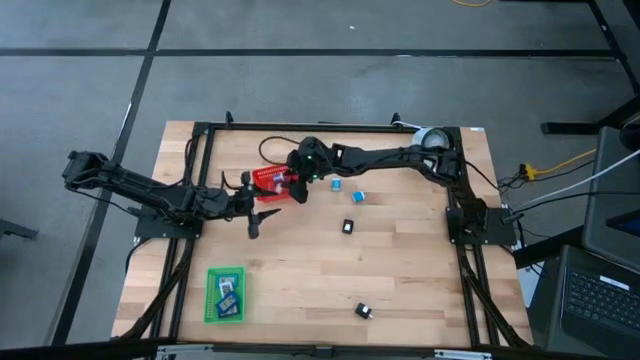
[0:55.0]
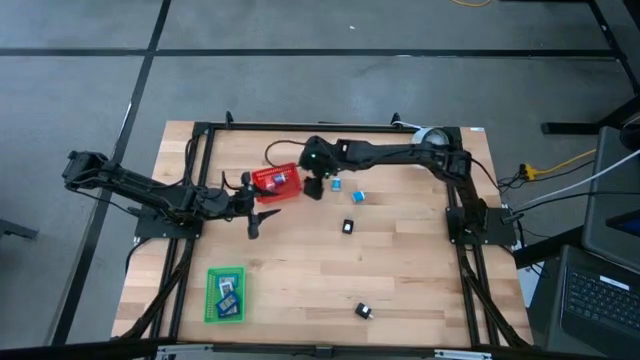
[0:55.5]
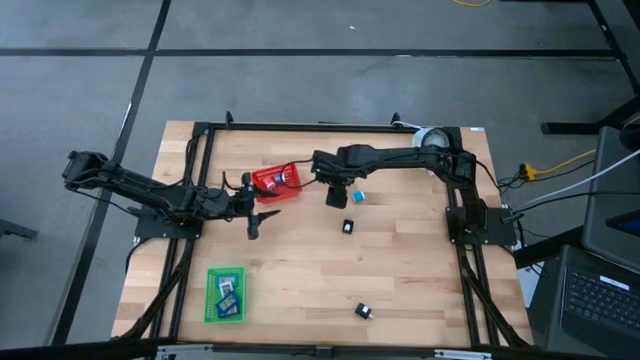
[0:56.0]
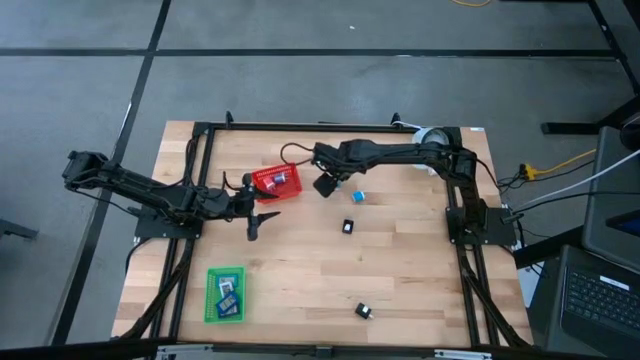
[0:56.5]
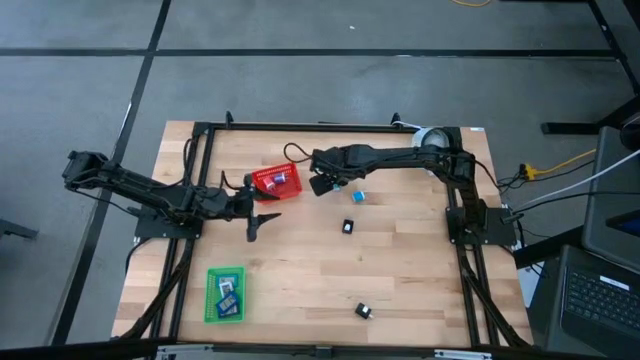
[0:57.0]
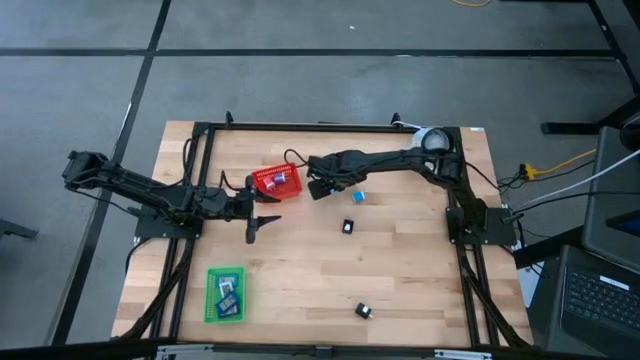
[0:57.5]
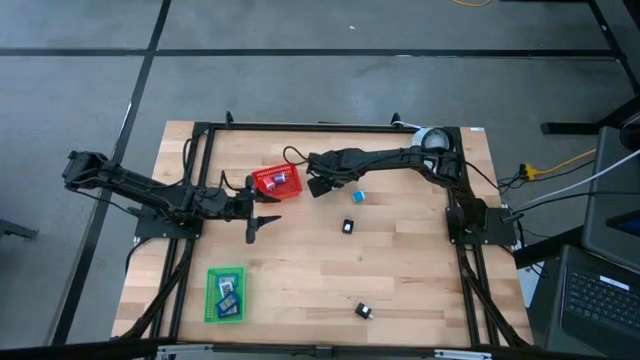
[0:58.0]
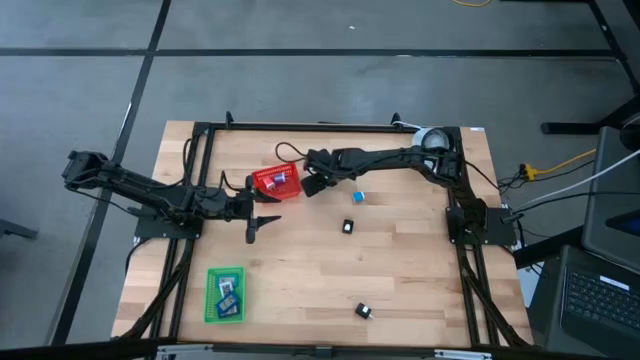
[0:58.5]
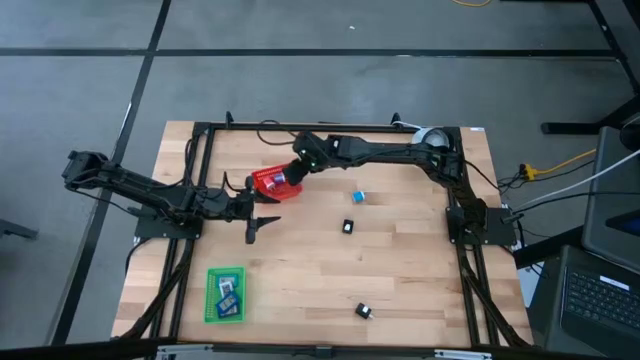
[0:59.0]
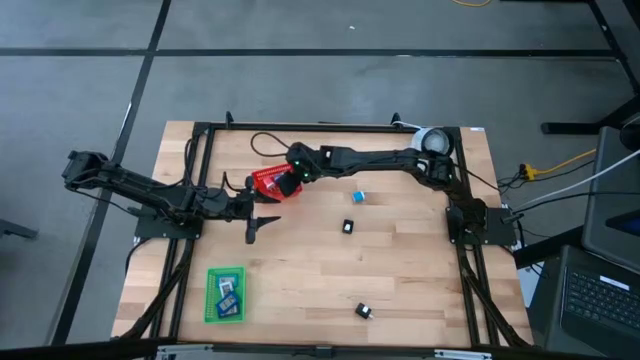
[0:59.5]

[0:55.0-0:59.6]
Task: Pick & Place Office items
Put the top light blue charger adapter into the red bin

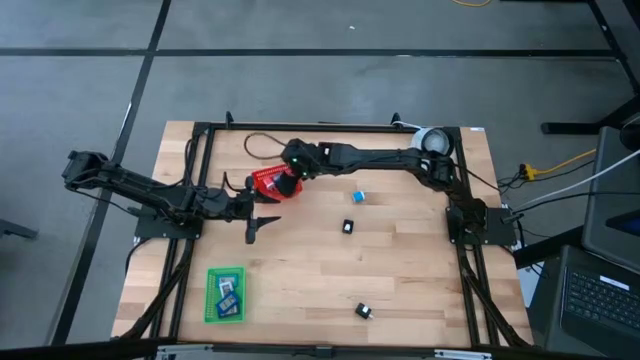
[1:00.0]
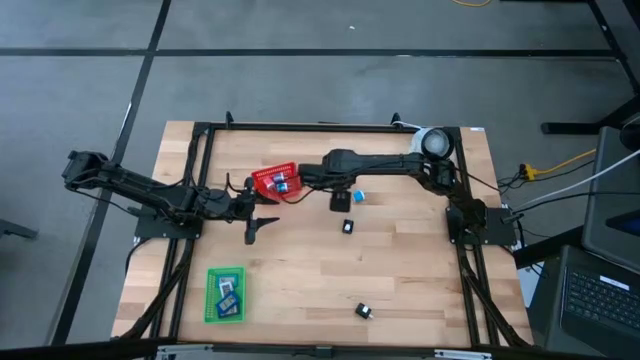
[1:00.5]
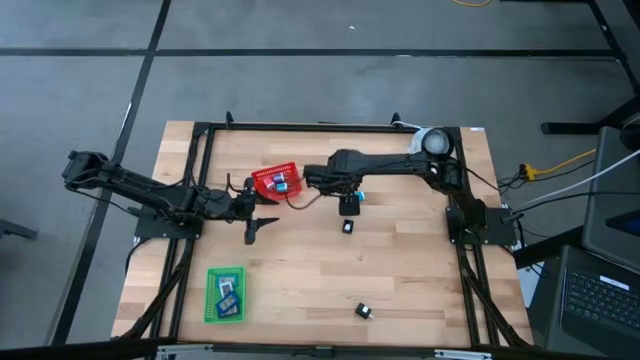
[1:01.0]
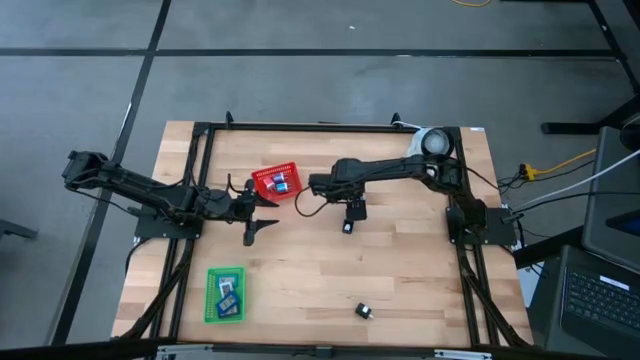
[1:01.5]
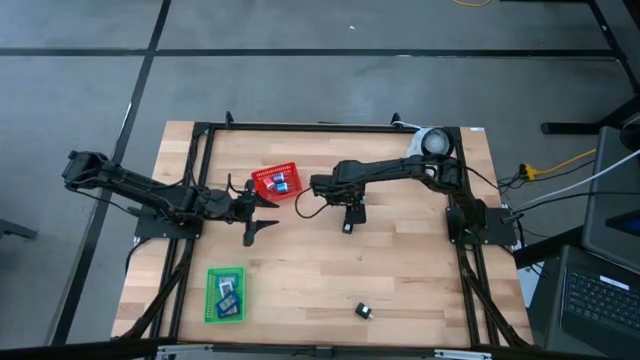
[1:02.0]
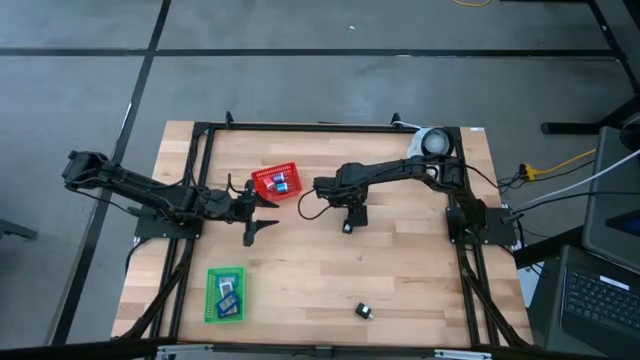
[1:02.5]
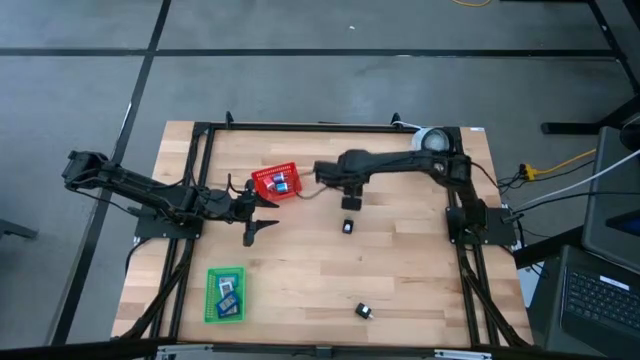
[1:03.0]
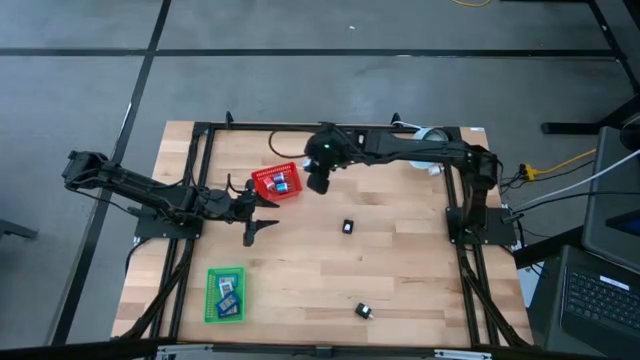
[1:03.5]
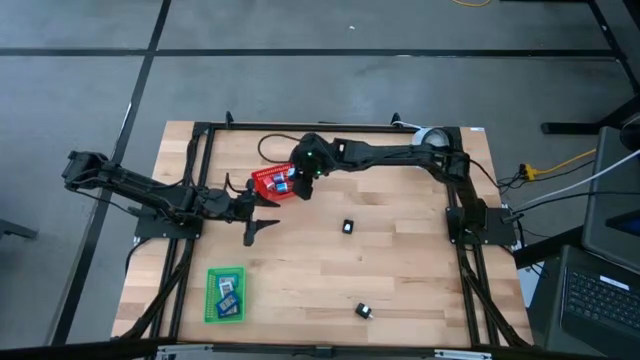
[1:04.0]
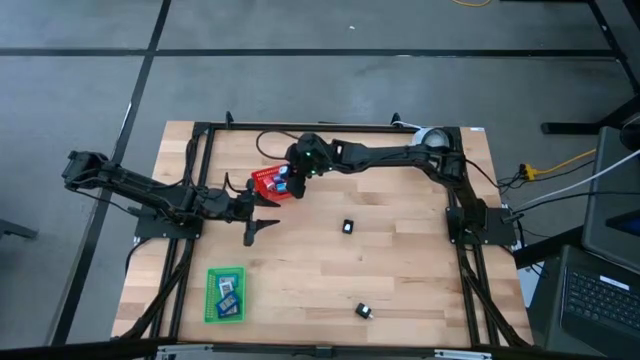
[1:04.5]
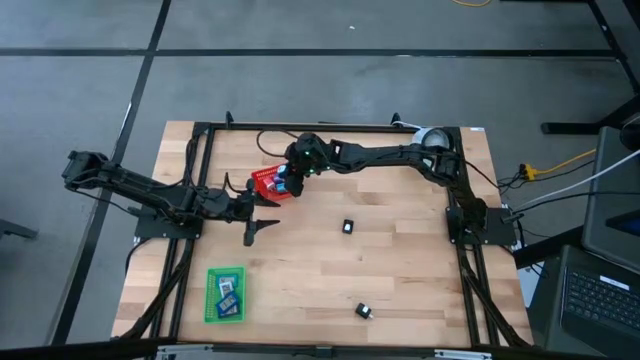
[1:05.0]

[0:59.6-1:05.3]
Put the light blue charger adapter into the red bin

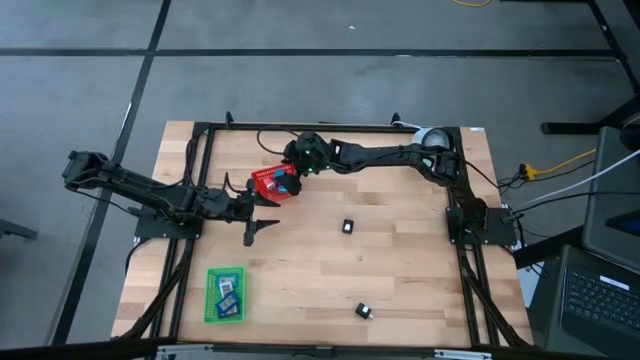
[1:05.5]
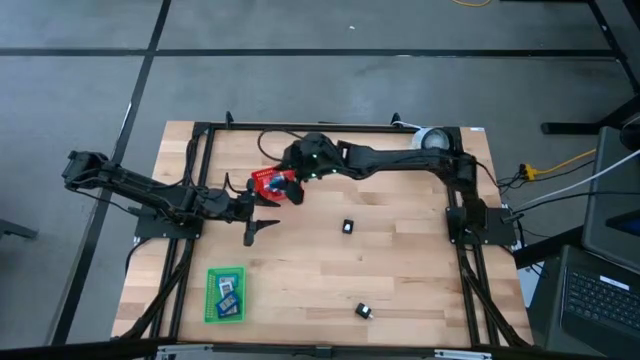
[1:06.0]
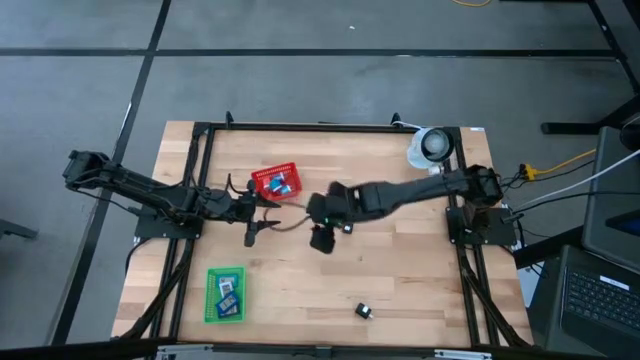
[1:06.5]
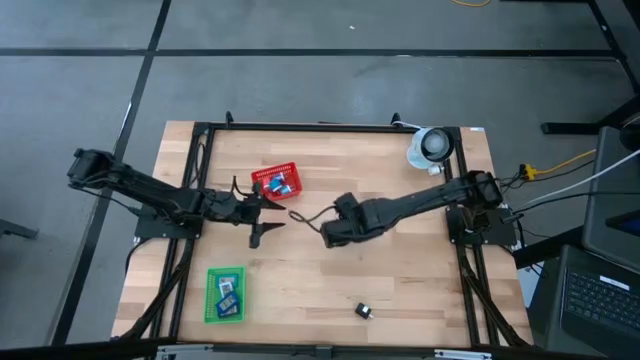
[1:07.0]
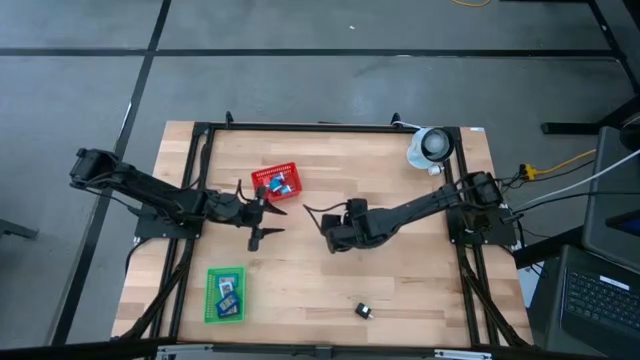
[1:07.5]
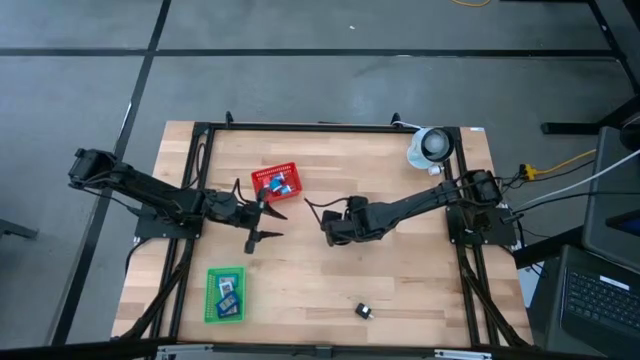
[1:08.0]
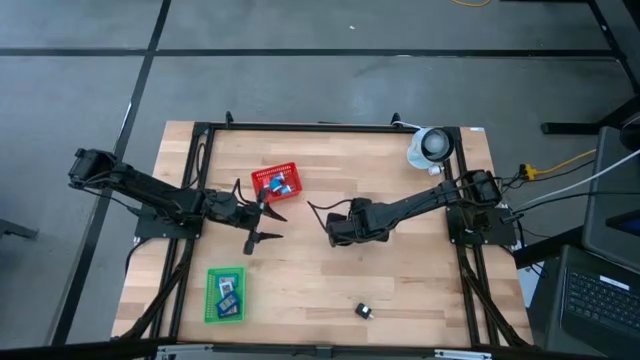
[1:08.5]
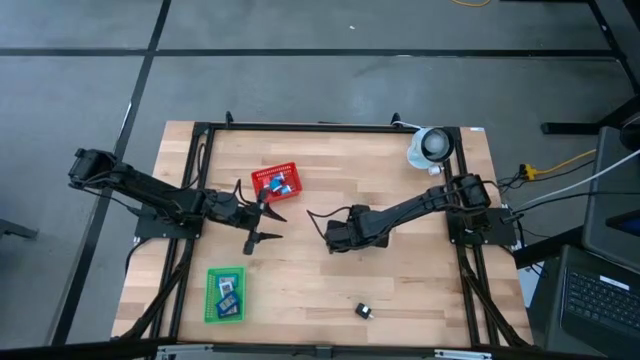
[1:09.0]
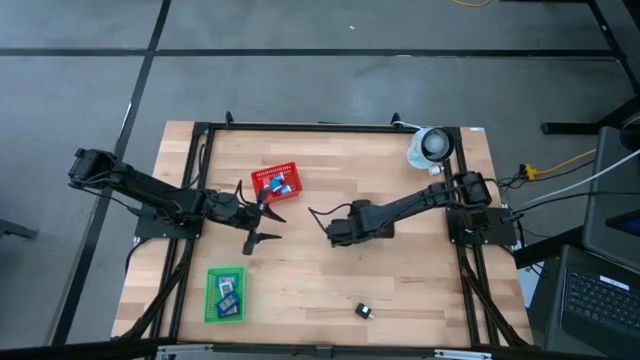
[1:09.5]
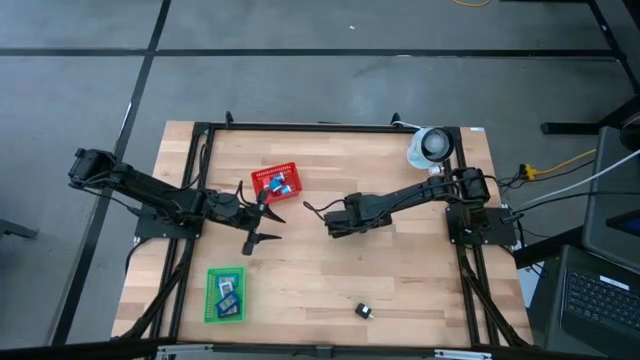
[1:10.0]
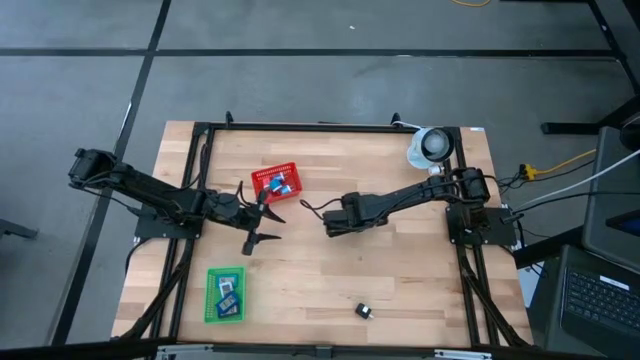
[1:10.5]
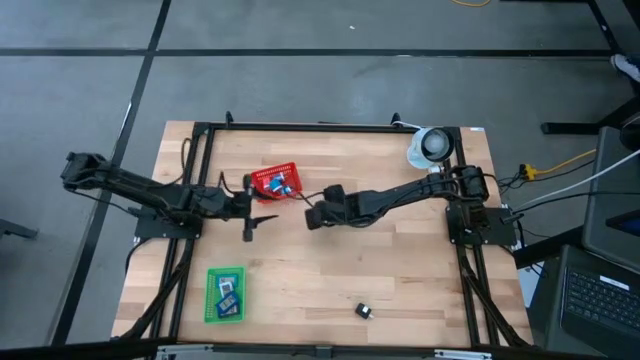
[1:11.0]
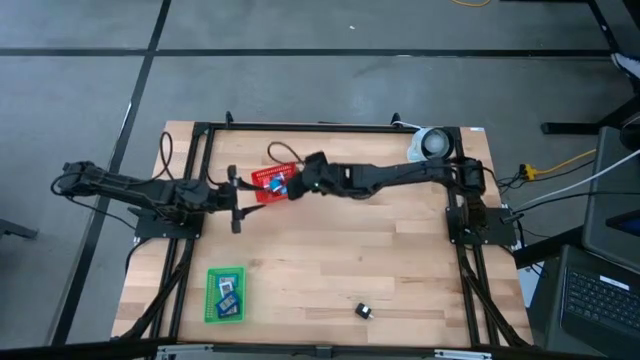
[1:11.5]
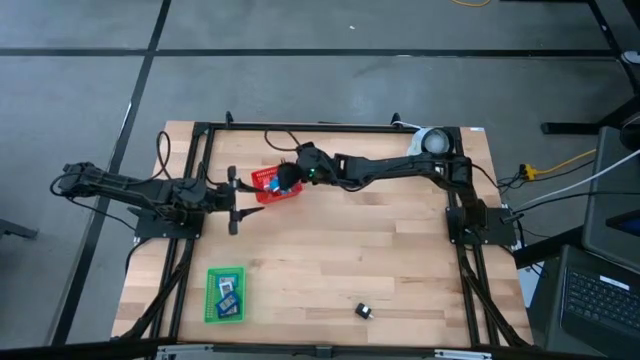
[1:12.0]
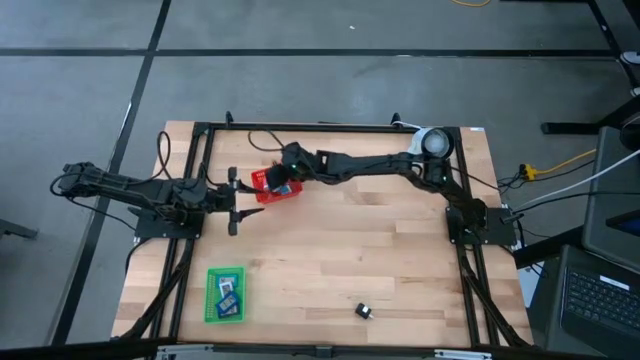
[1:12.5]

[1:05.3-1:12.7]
Put the top black charger adapter into the red bin

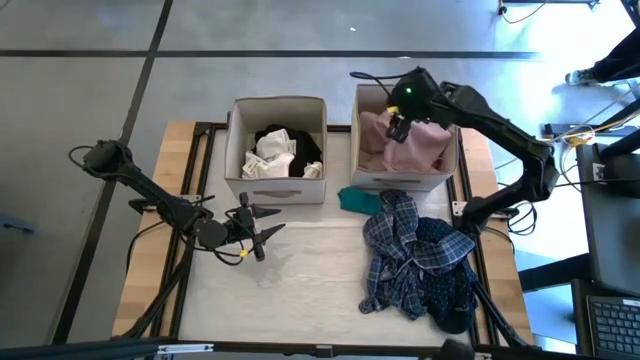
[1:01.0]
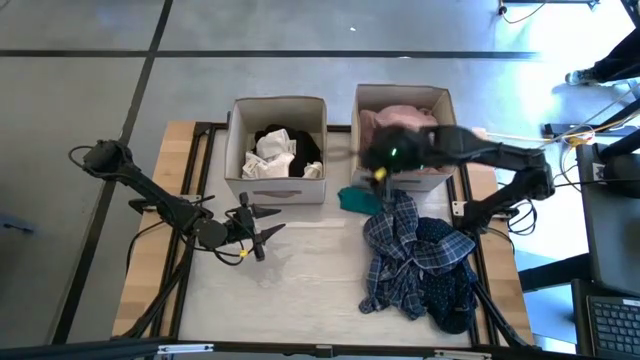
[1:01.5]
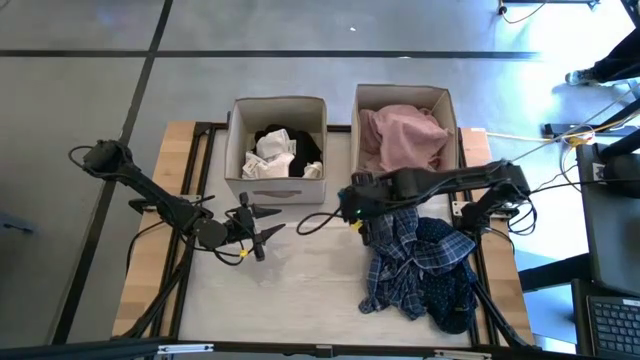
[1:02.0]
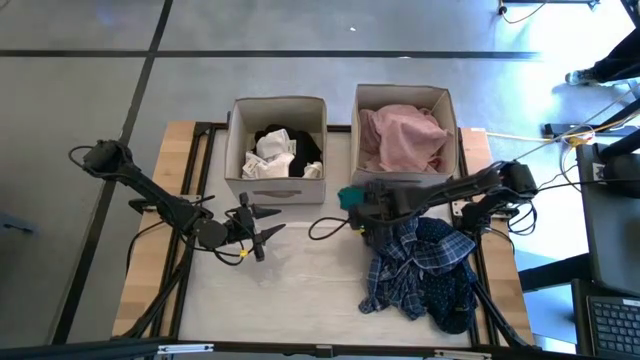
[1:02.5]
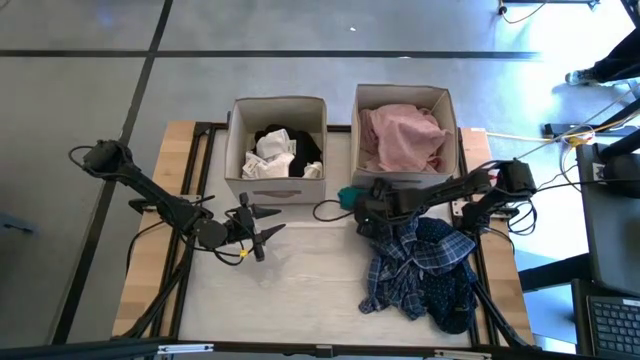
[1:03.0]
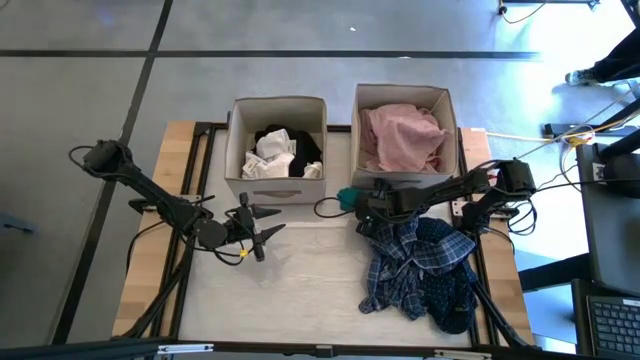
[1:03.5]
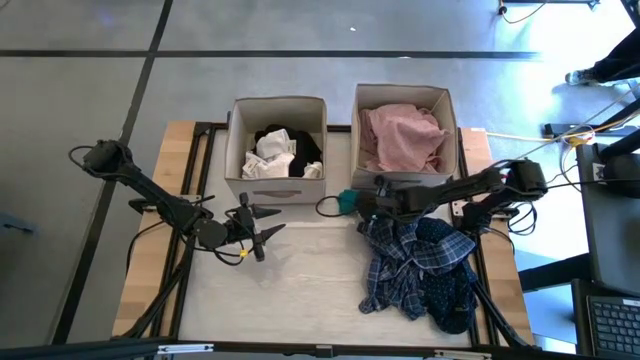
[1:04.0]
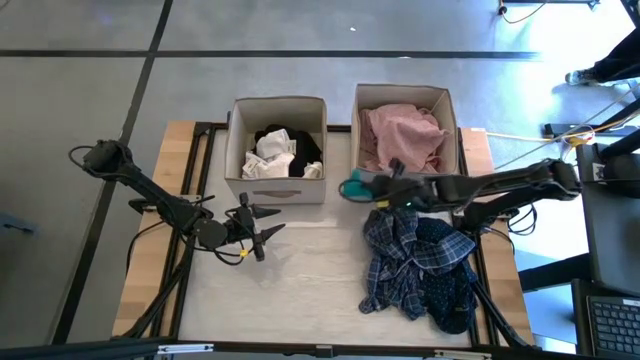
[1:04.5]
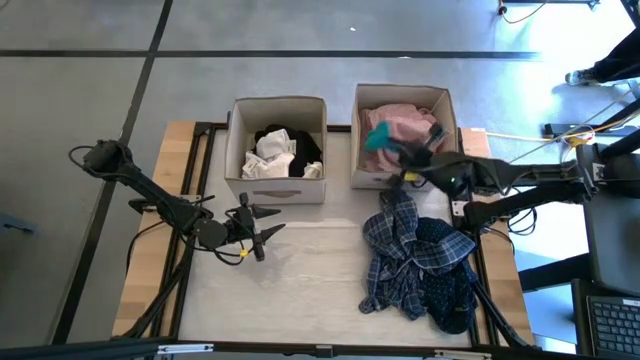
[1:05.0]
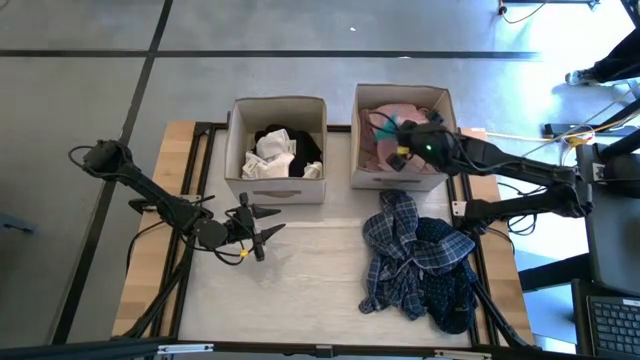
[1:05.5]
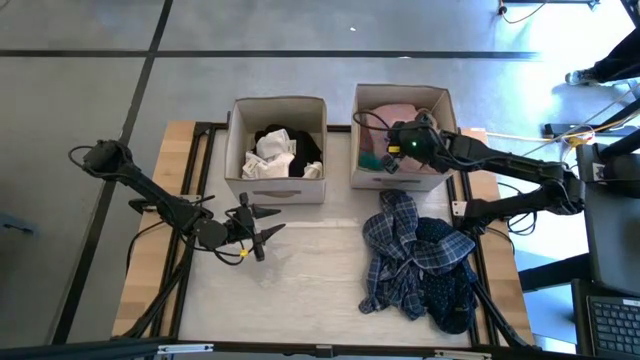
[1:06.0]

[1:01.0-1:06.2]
Task: Sort clothes
Put the green towel into the right laundry organizer
